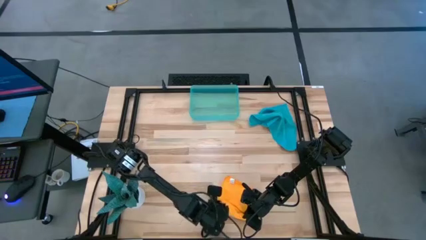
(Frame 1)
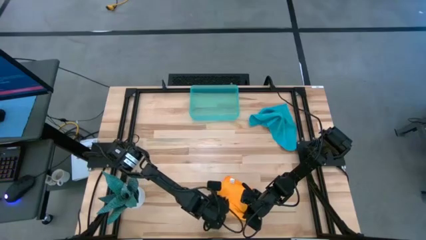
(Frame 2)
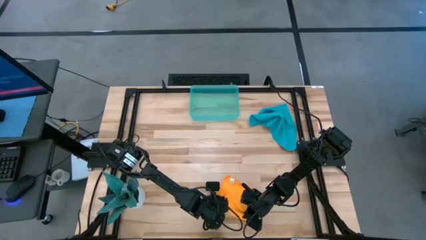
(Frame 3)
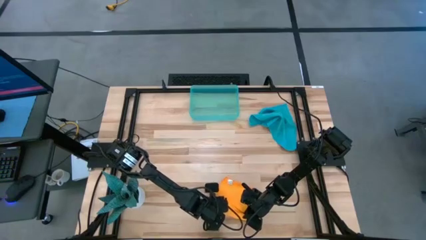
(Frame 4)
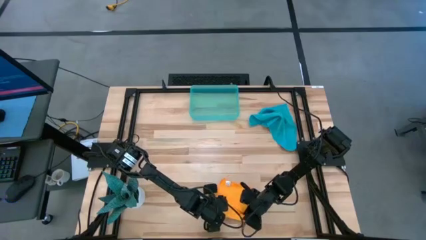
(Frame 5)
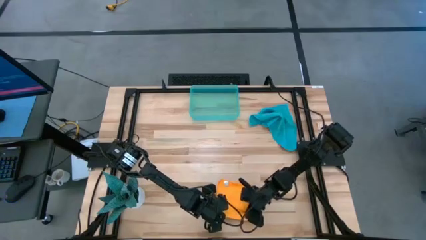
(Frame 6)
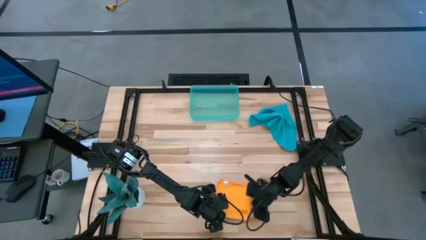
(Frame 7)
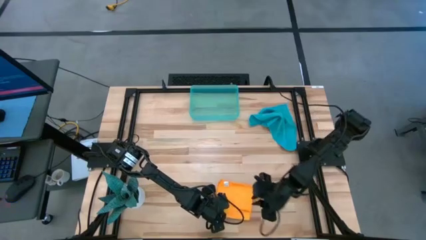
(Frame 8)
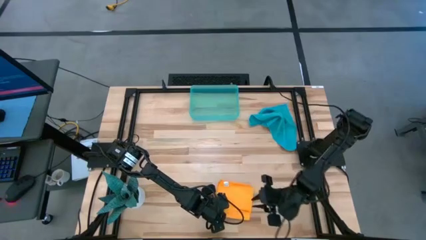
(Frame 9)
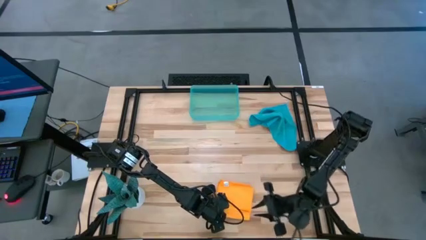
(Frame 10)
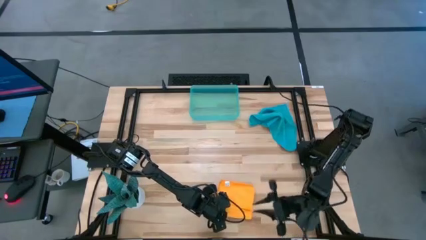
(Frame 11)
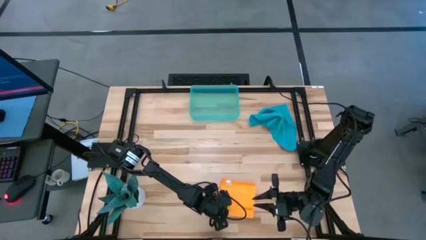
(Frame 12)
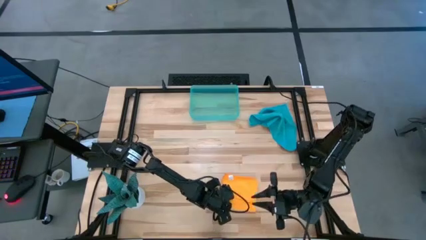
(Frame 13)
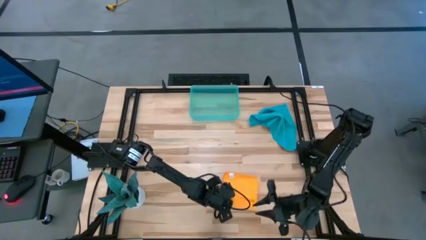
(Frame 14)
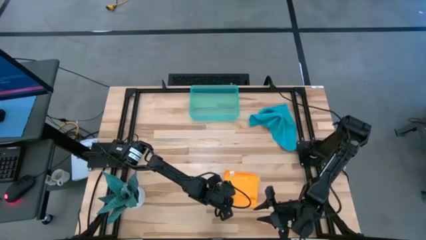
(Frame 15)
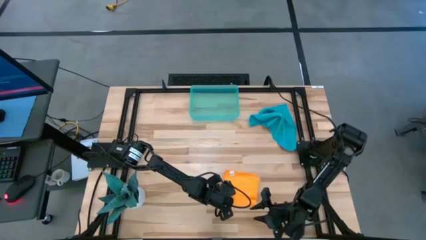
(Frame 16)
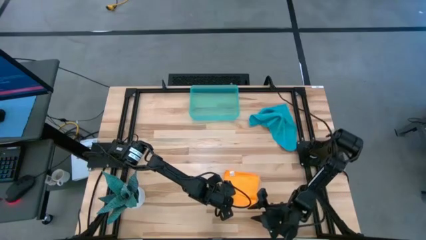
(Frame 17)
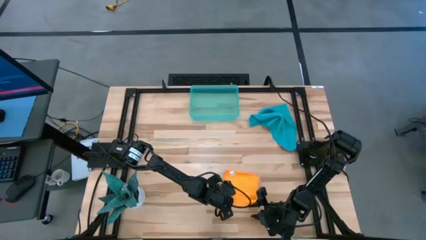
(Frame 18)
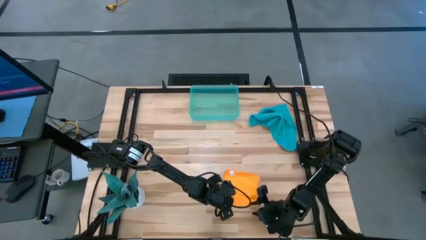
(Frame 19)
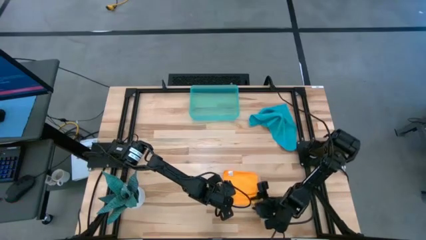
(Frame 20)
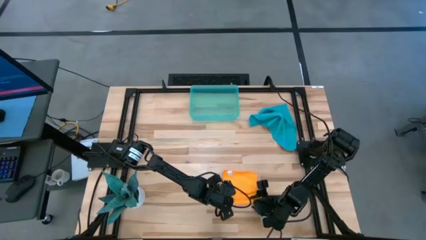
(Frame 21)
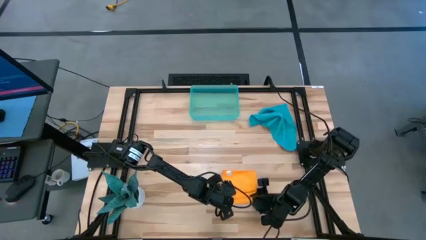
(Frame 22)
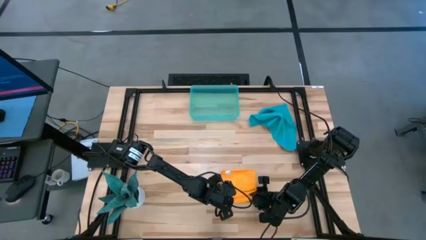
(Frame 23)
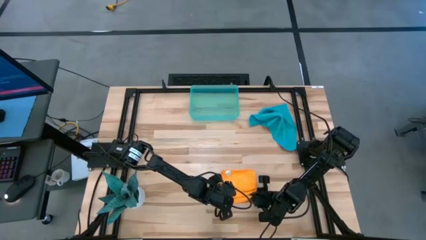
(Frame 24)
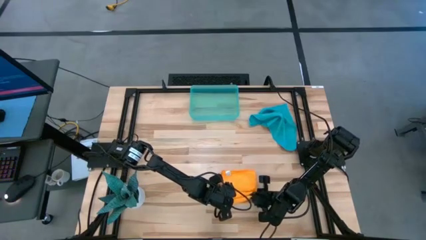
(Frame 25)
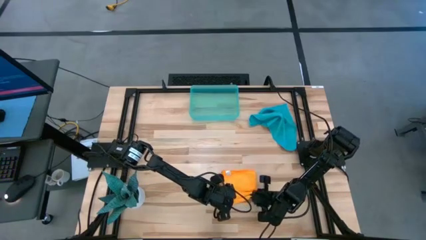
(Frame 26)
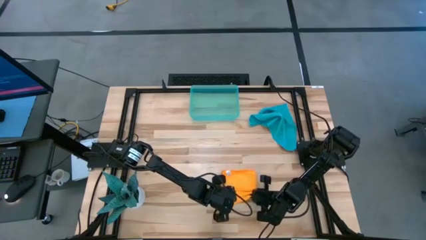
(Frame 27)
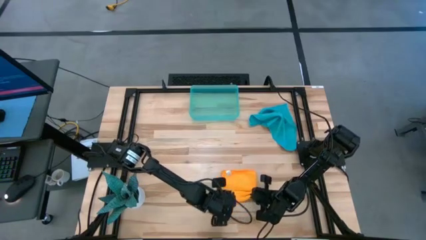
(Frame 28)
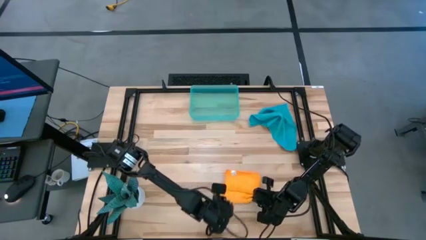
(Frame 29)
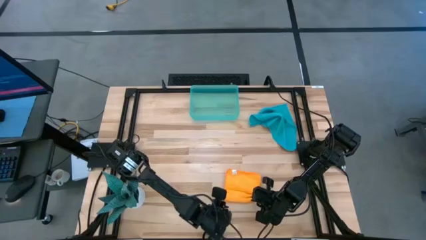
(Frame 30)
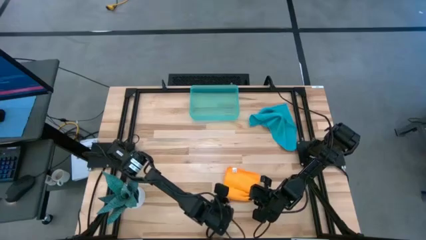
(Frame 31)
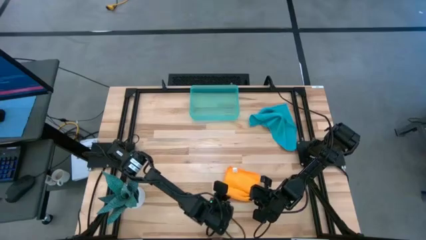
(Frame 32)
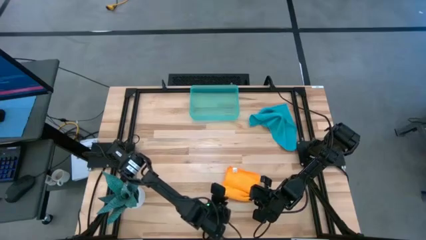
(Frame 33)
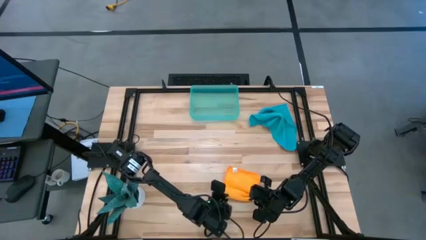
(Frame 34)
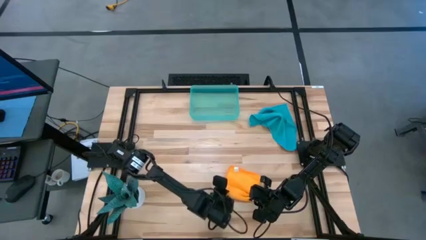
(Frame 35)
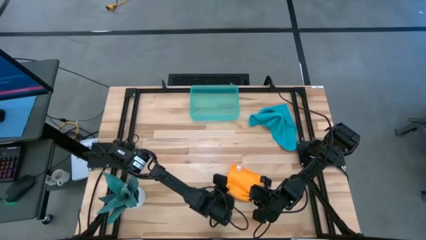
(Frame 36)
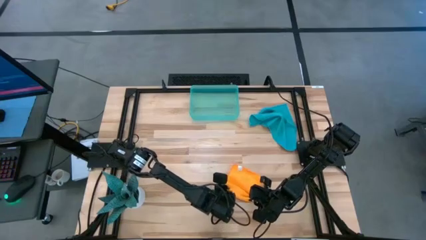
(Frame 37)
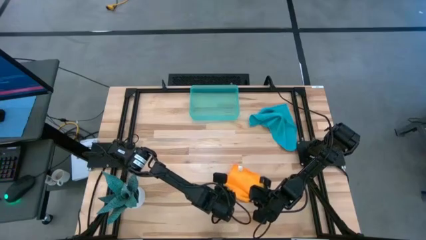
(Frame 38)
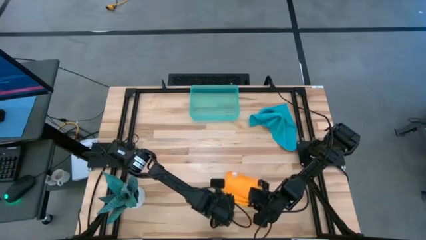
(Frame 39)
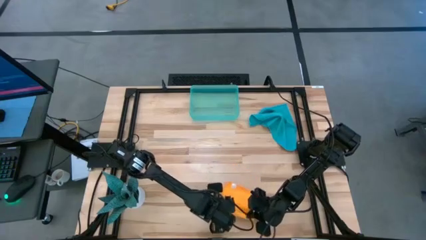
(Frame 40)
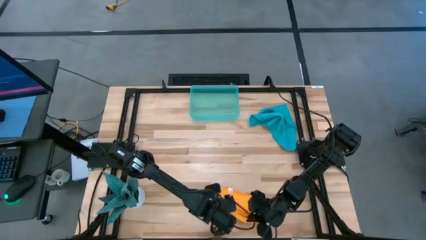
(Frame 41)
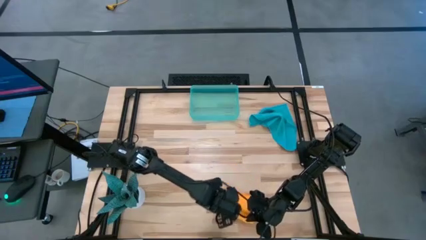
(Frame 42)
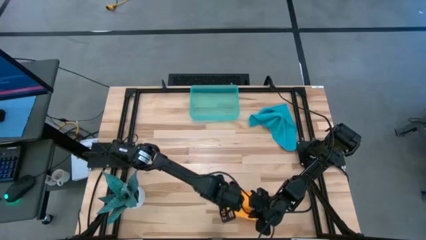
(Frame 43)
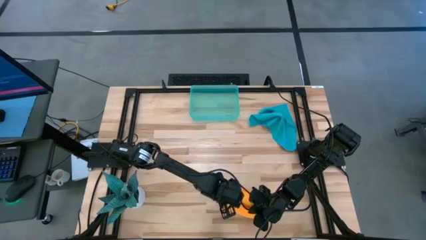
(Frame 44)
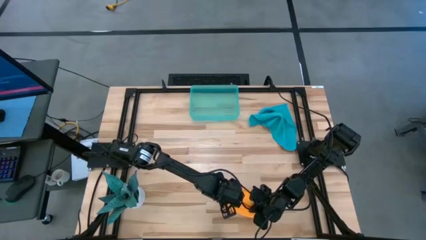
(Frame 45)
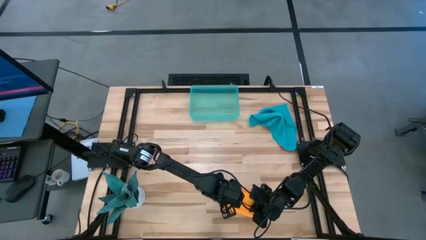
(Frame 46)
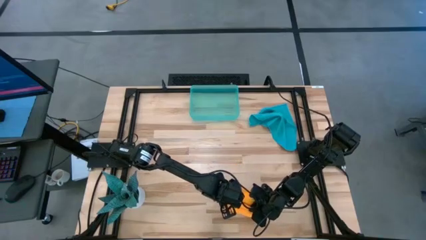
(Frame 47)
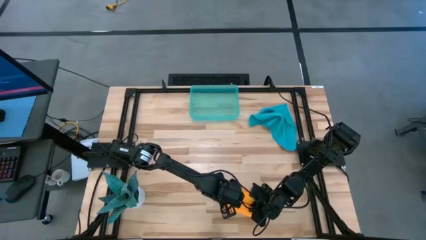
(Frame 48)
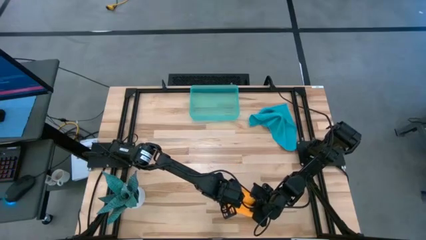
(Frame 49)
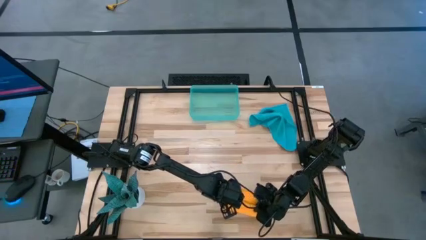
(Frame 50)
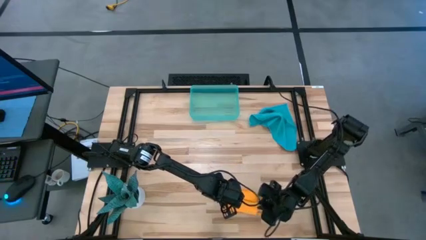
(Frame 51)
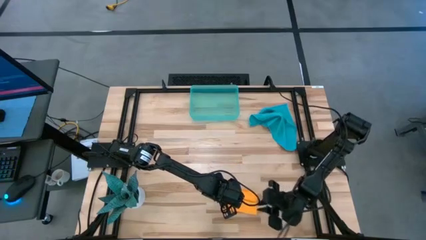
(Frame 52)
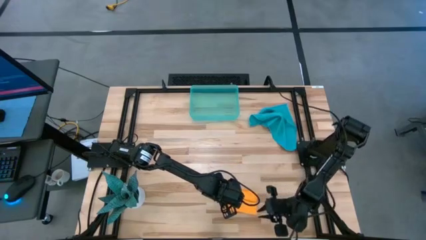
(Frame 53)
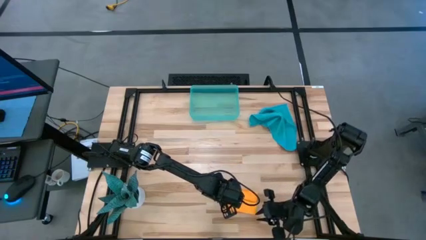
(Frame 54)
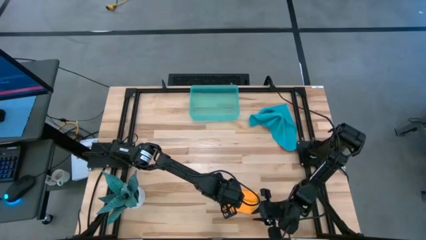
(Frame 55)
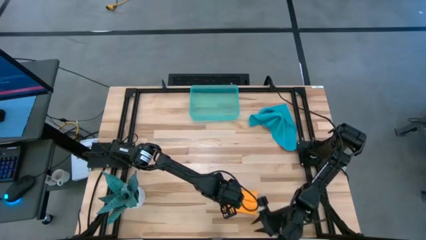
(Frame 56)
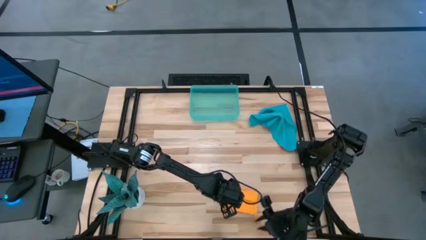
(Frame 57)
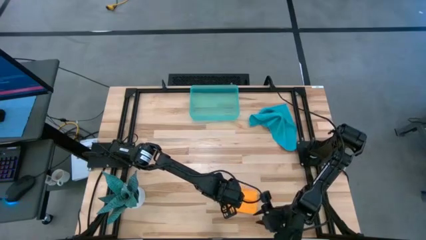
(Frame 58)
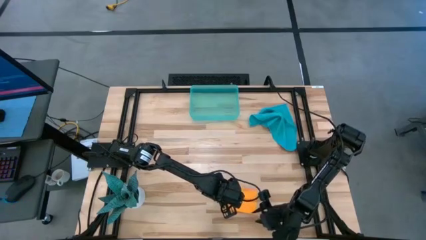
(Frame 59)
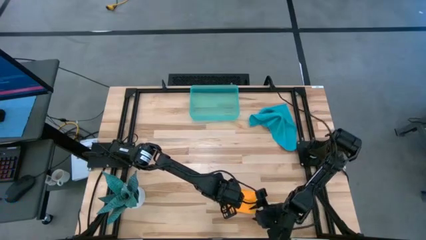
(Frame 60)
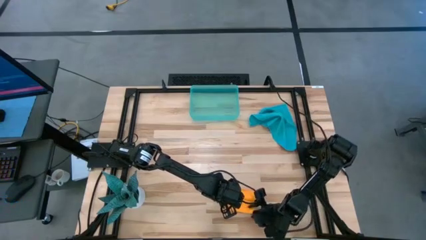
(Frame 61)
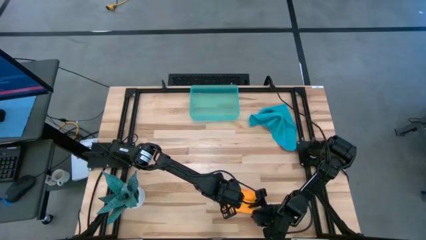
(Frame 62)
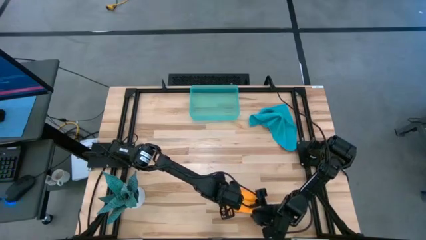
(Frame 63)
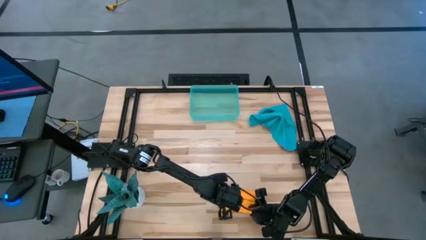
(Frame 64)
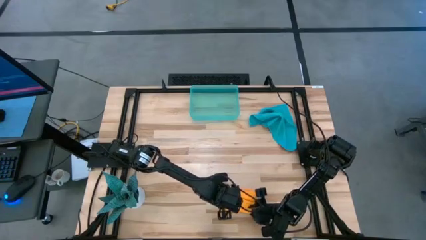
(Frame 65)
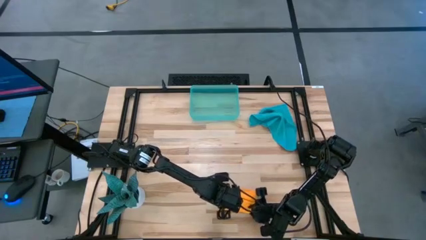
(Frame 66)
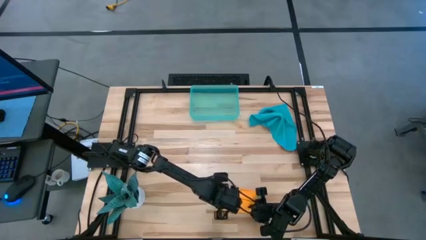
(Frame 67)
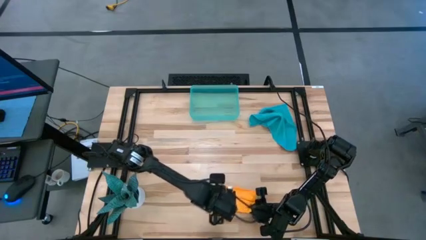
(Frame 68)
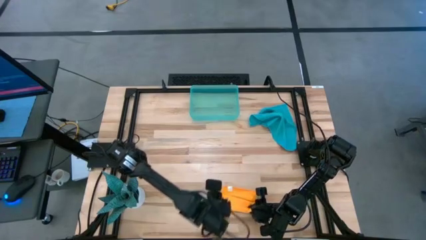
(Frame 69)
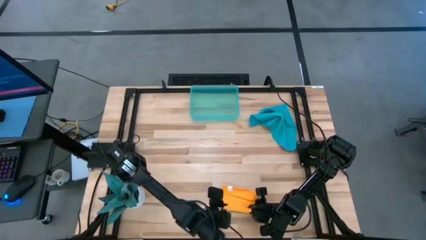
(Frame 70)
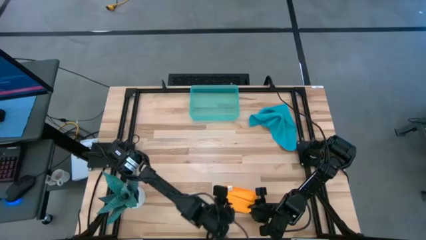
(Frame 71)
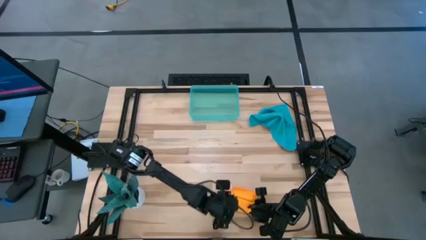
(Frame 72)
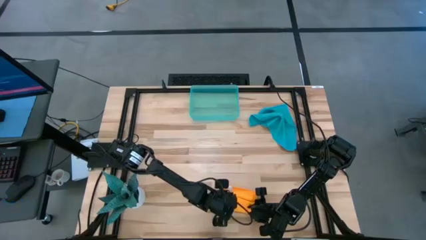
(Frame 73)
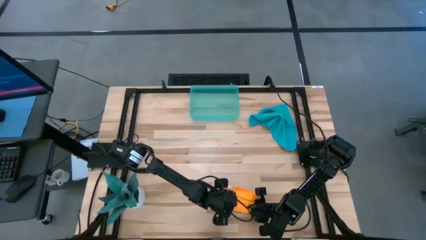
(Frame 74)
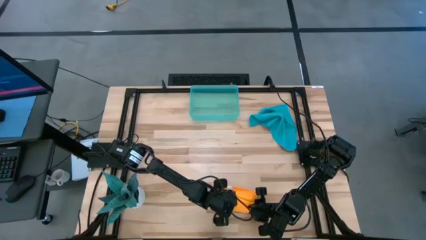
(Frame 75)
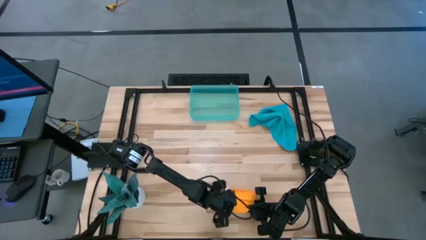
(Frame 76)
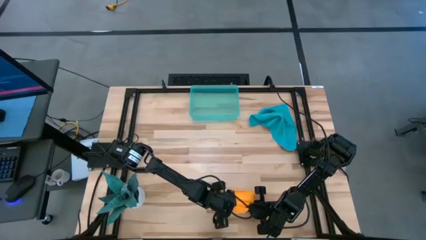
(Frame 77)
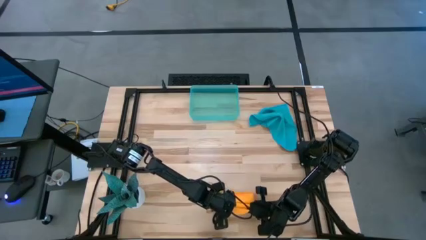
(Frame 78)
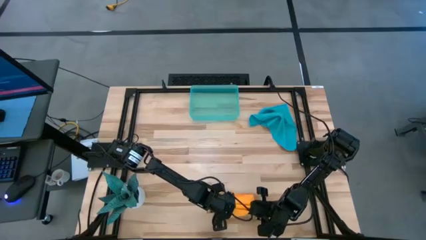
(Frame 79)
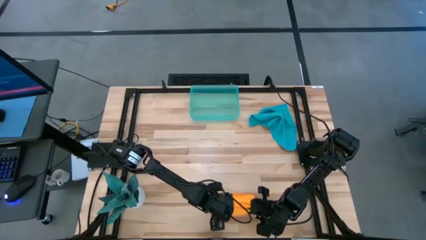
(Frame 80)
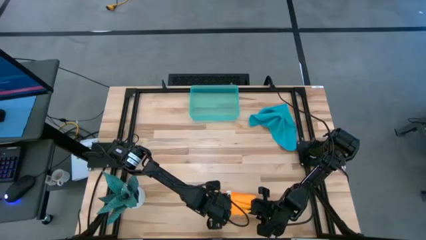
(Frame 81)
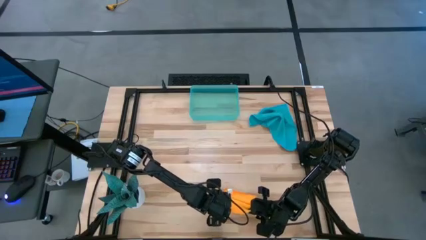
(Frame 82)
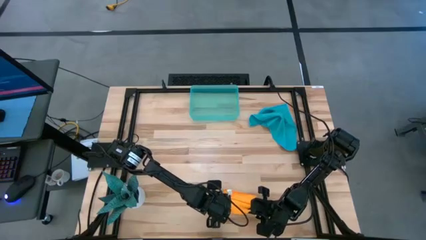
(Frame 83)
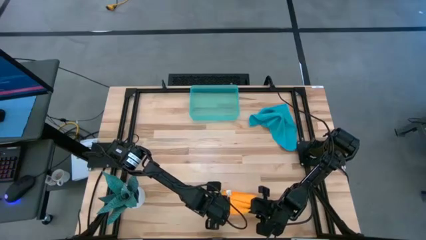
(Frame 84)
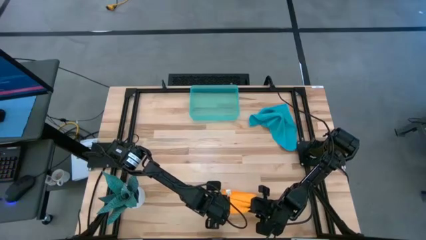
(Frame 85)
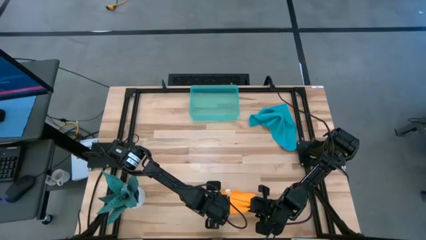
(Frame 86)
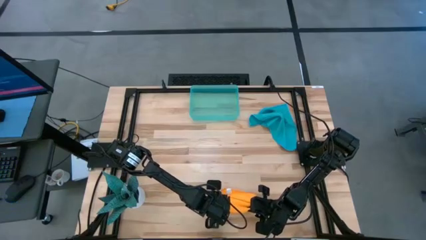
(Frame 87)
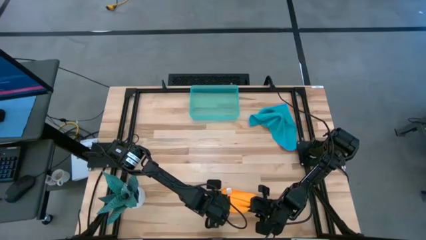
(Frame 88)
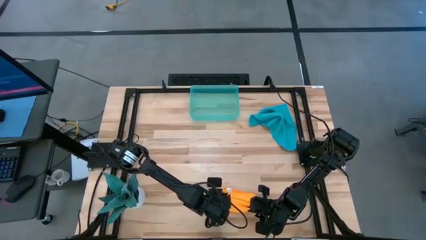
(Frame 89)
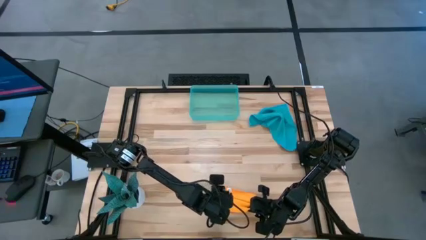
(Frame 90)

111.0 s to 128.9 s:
Task: Roll microfiber towels into tight, uniform cylinder then place into a basket
Roll the yellow microfiber cloth on the table
